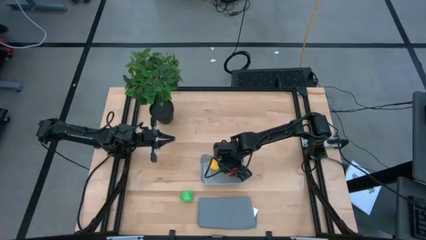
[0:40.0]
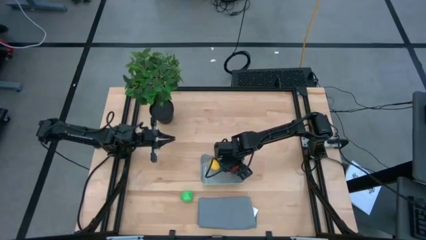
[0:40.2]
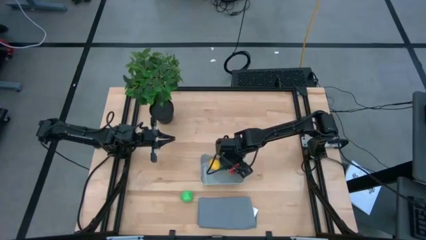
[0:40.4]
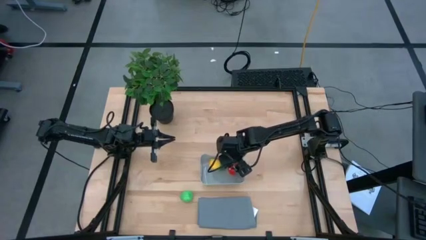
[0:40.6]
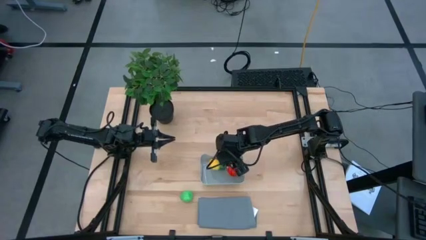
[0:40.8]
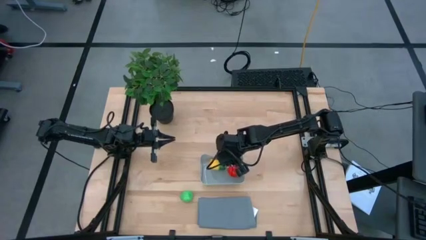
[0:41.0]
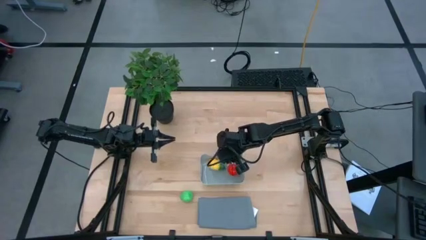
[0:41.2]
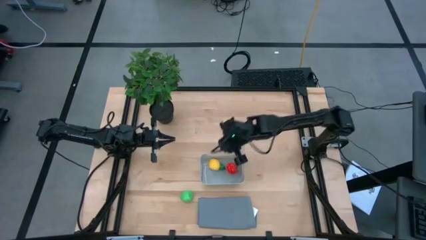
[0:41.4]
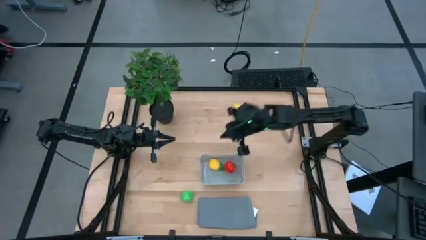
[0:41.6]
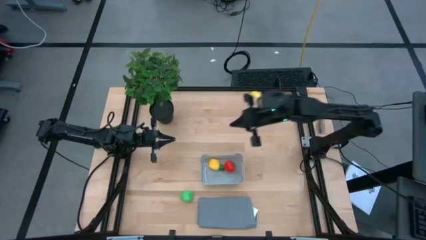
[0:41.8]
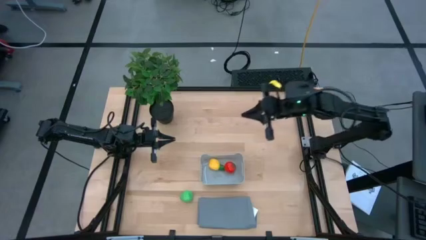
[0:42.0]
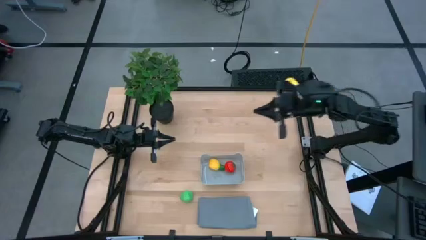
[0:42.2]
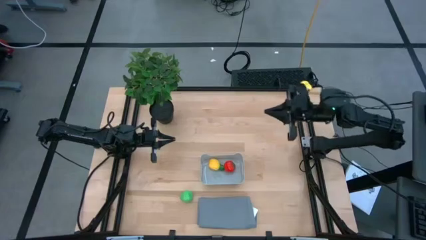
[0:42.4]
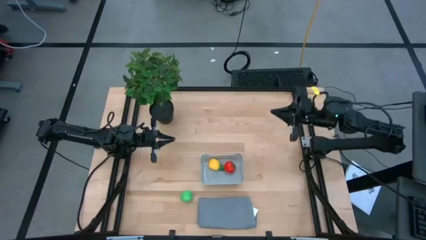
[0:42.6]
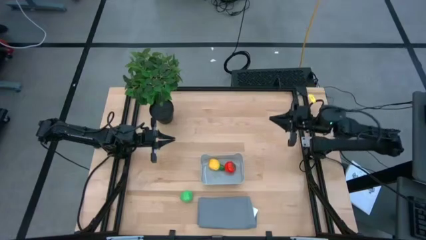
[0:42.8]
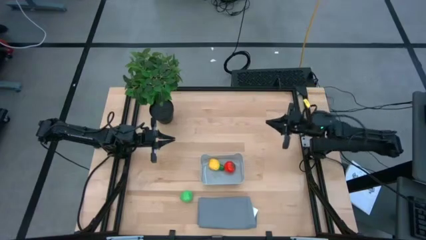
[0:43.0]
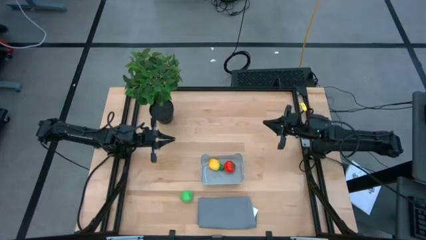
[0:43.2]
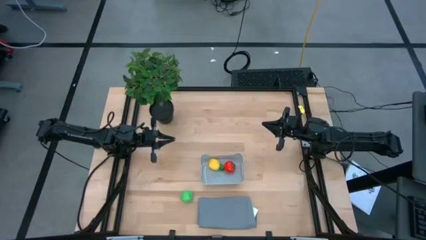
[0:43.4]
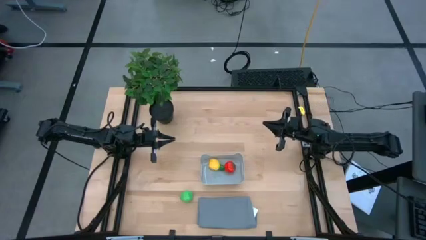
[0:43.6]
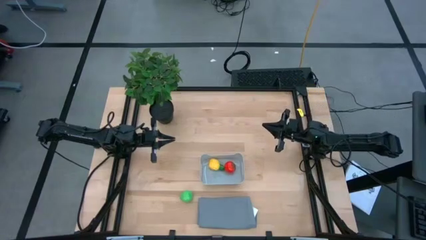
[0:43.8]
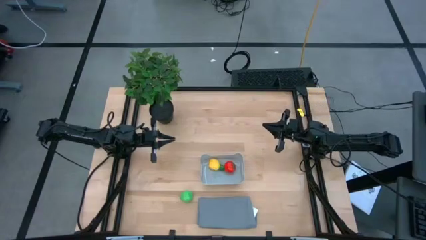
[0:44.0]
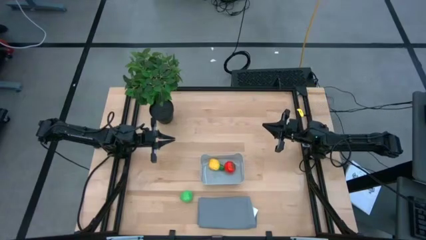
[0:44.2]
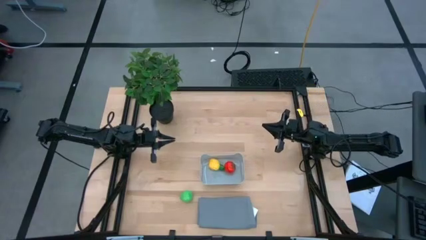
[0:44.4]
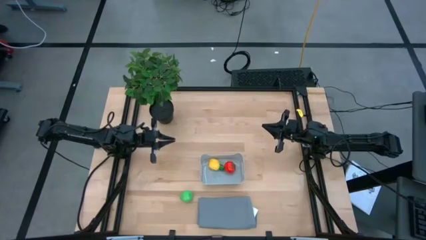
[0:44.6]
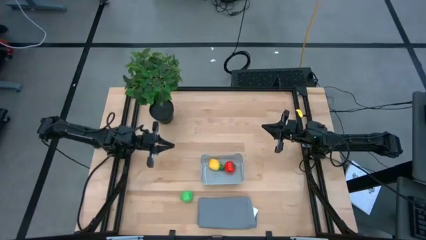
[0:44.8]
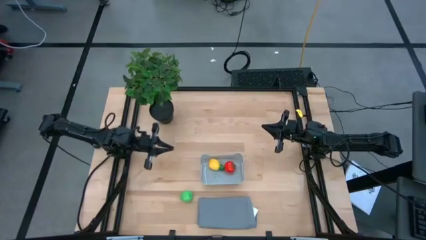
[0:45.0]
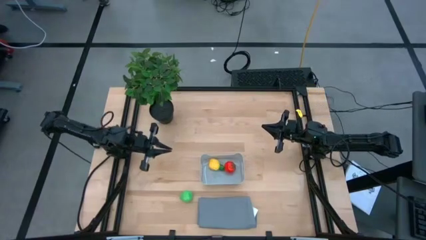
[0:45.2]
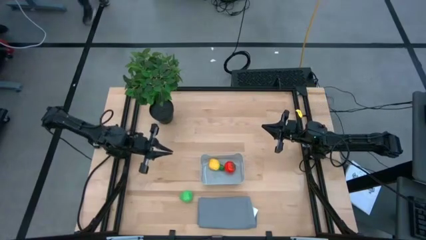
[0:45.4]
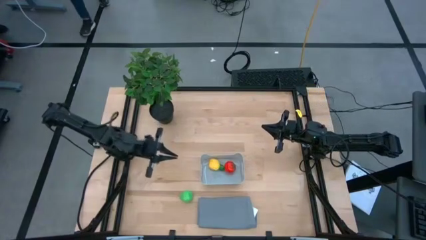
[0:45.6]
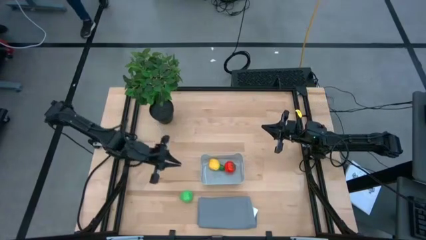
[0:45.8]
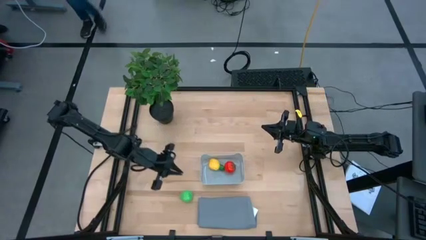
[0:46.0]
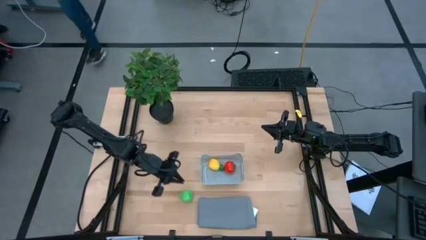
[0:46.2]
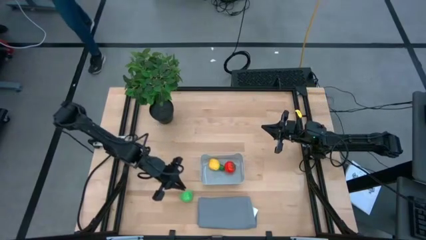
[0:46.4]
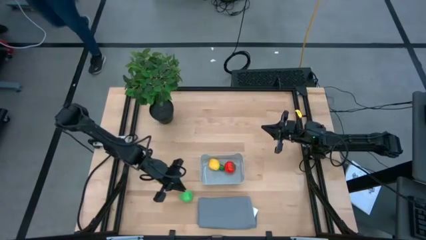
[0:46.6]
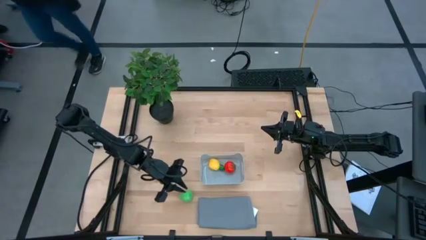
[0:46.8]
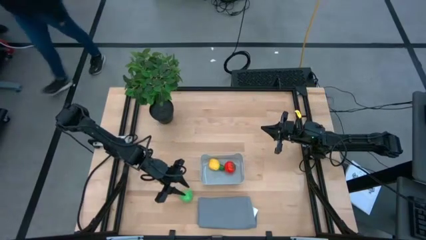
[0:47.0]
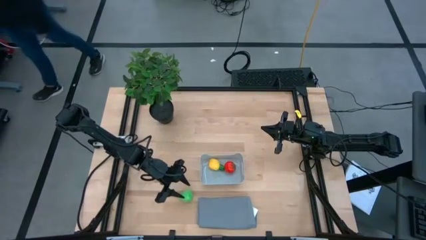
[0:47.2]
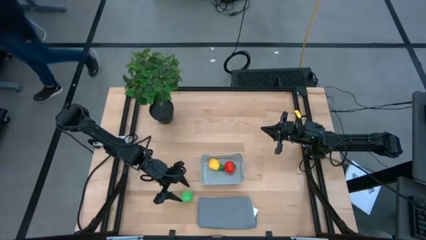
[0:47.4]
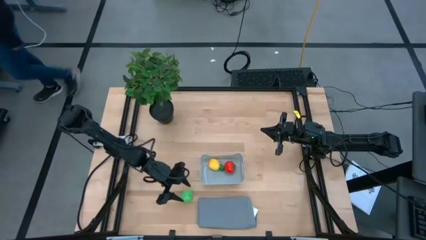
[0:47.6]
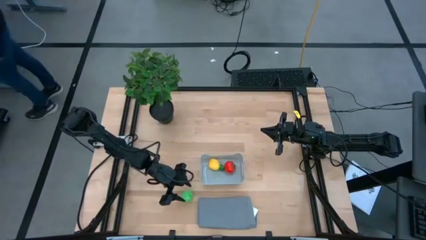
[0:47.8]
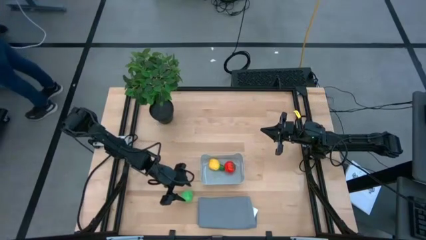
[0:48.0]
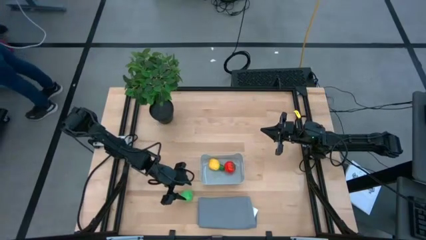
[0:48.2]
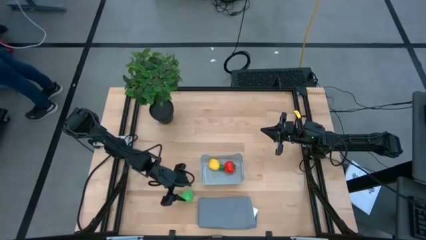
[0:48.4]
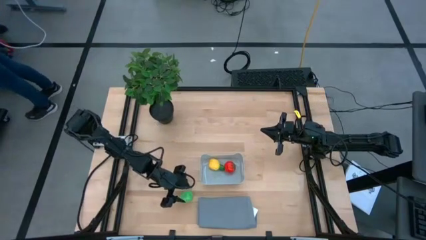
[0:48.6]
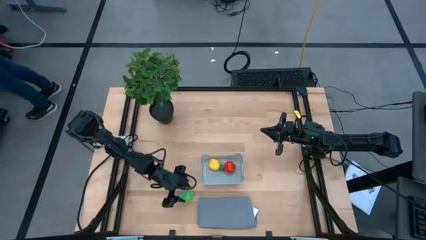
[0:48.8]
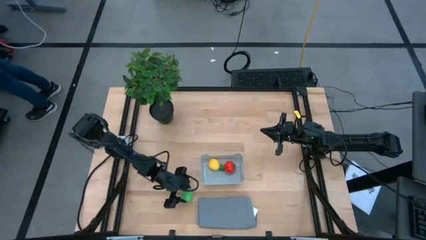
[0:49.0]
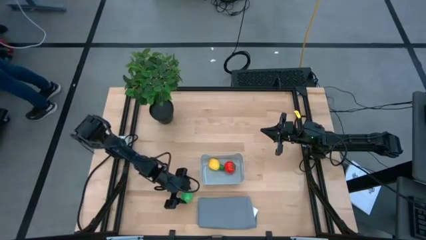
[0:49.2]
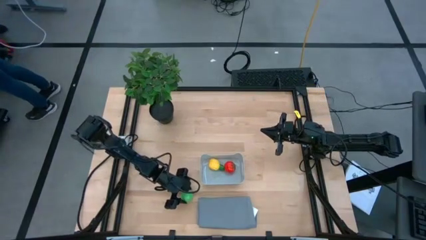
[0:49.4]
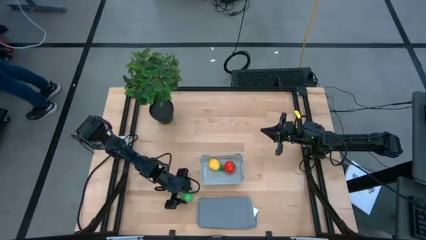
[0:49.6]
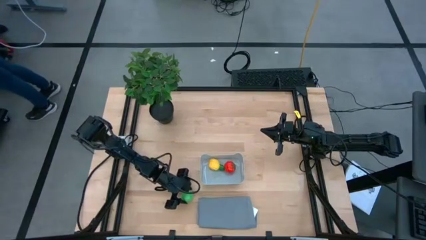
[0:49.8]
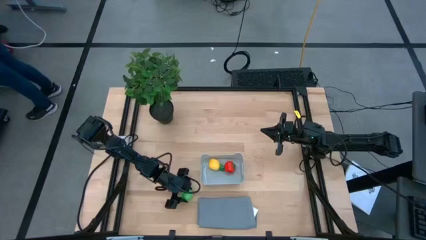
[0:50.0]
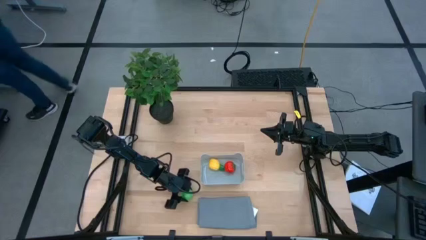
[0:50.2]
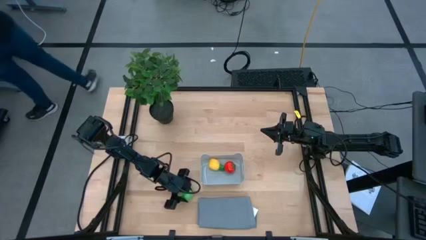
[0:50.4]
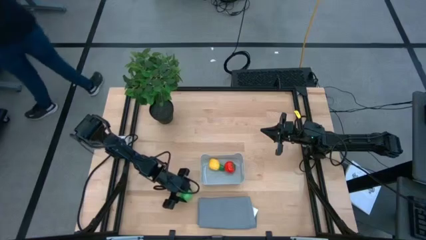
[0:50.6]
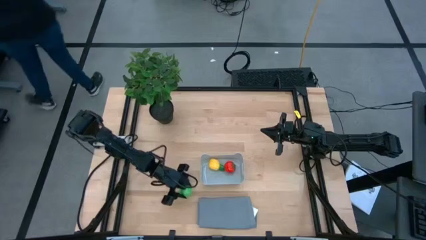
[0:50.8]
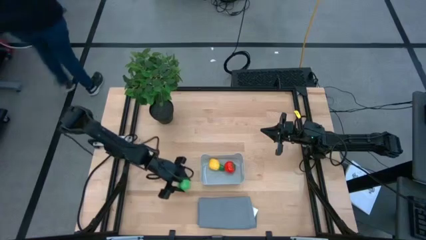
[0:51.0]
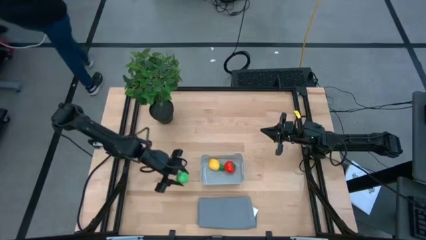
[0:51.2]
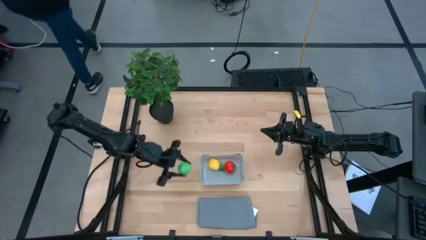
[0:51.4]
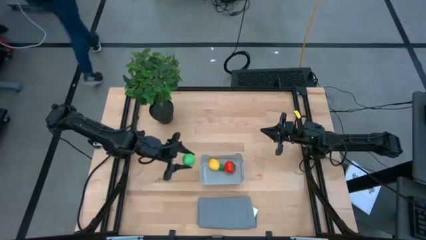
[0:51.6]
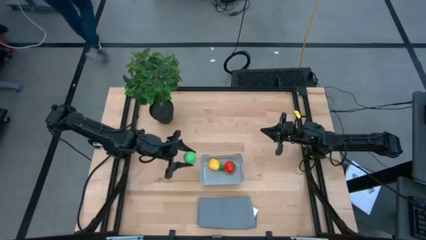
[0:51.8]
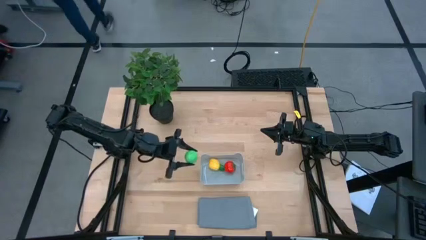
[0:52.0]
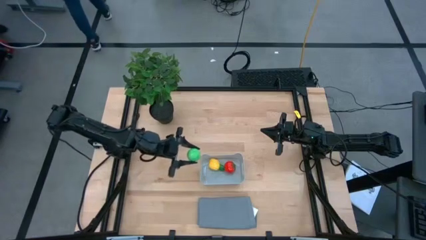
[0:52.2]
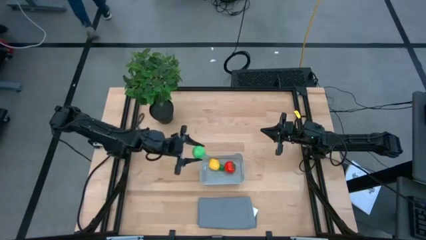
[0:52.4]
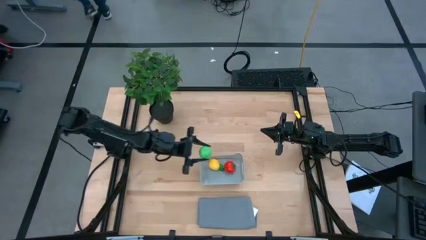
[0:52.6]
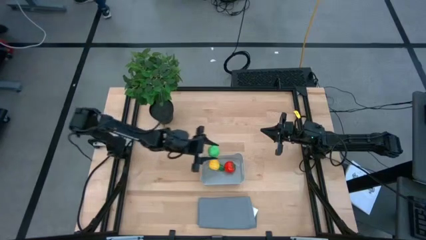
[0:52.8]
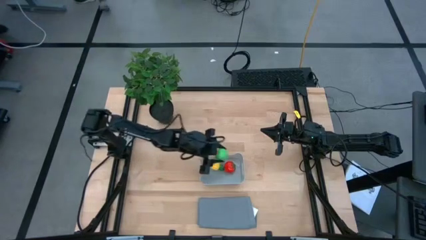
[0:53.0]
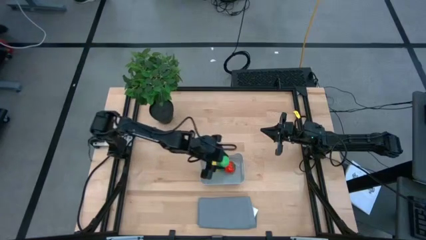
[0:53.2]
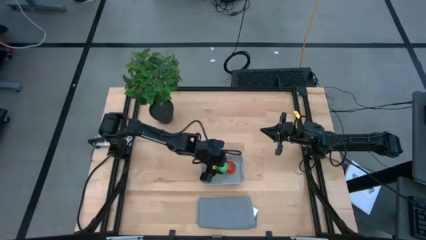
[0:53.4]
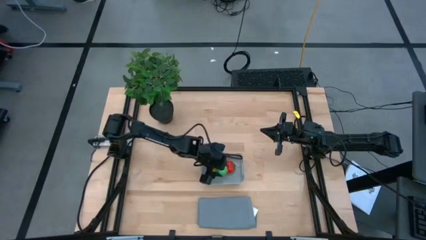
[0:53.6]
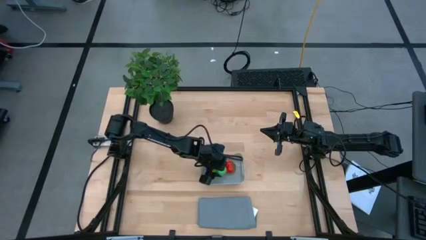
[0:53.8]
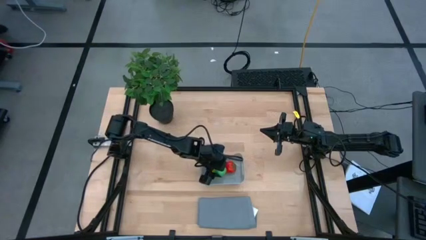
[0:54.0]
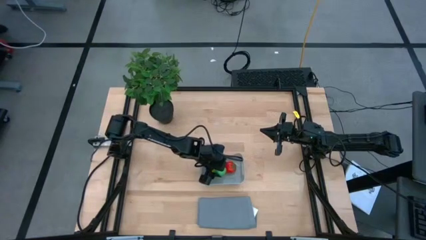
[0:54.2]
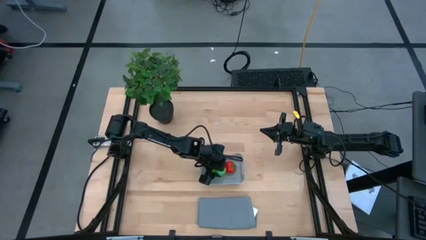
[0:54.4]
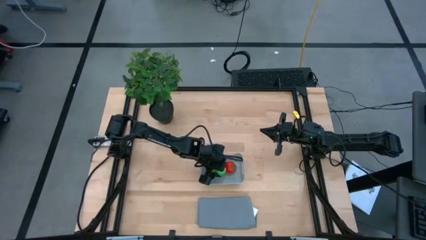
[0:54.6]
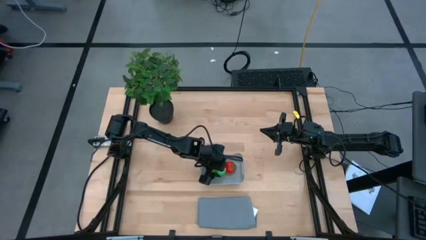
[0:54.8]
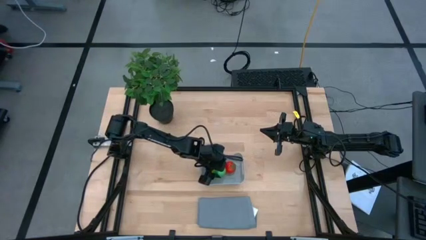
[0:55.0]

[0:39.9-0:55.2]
Task: Pick and placing Produce into tupperware
Put the green pear into the gray bin
